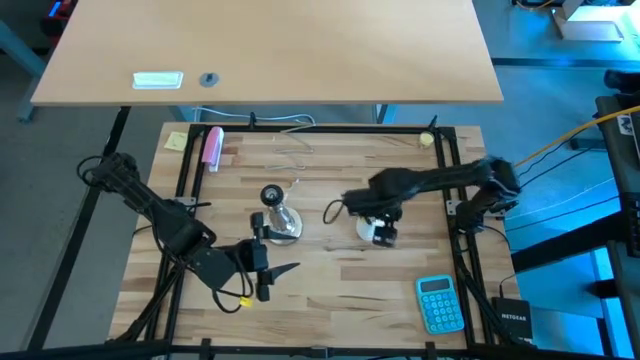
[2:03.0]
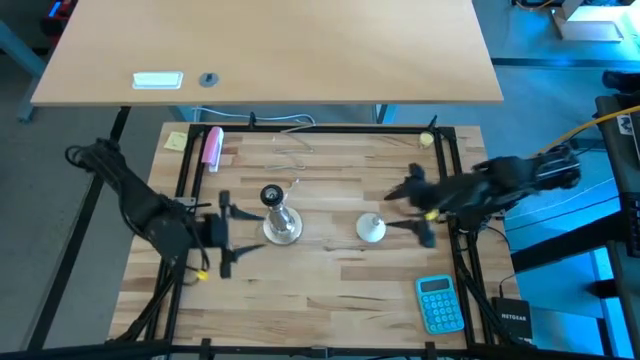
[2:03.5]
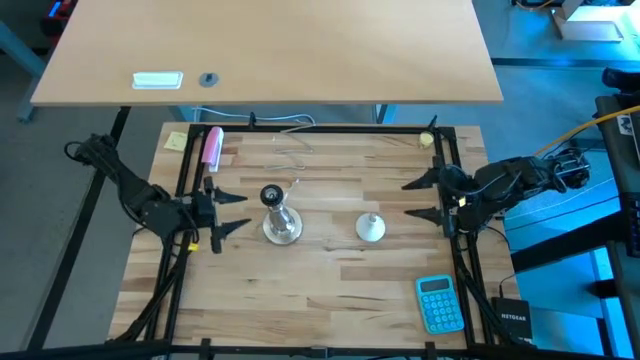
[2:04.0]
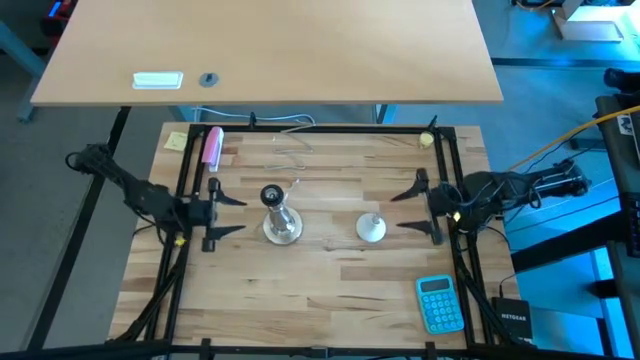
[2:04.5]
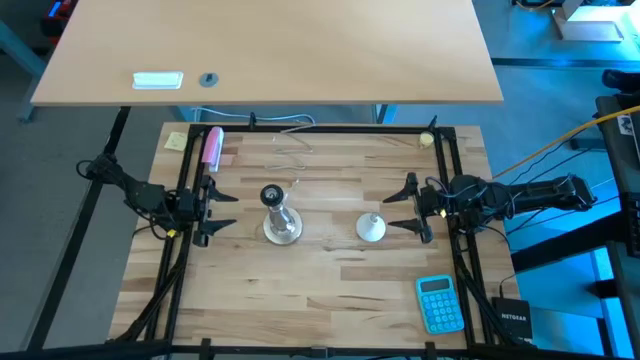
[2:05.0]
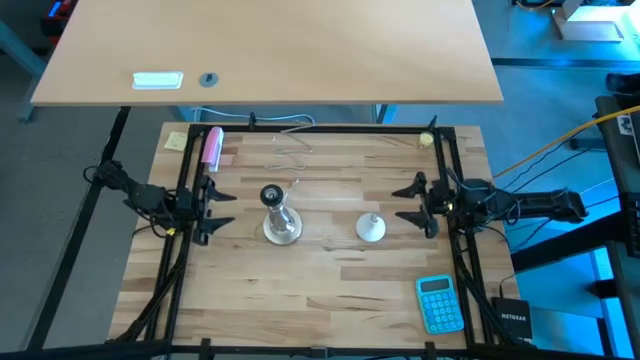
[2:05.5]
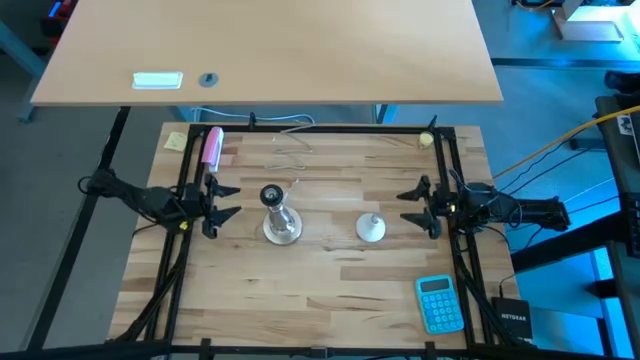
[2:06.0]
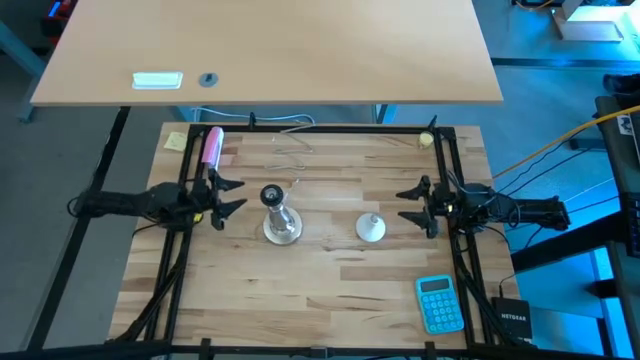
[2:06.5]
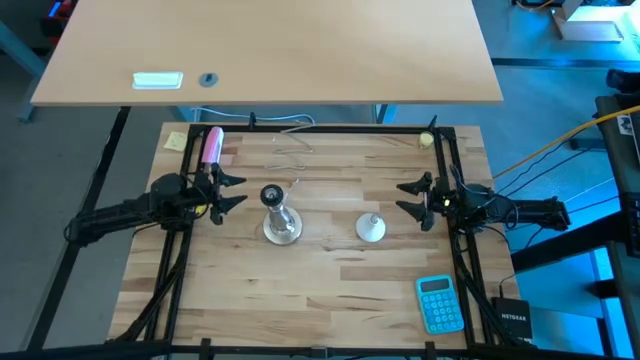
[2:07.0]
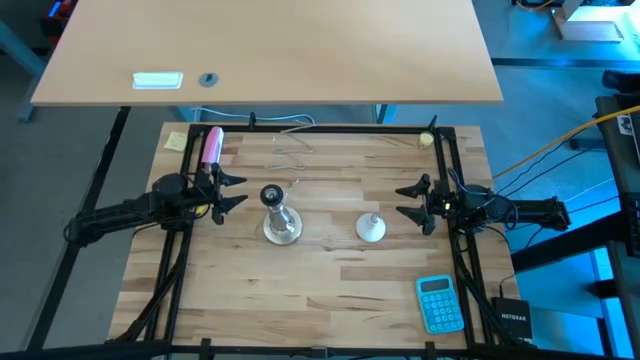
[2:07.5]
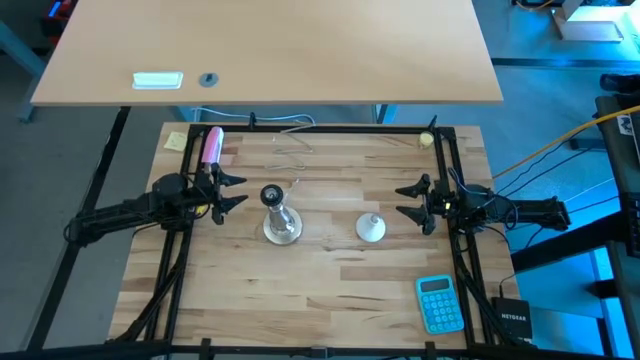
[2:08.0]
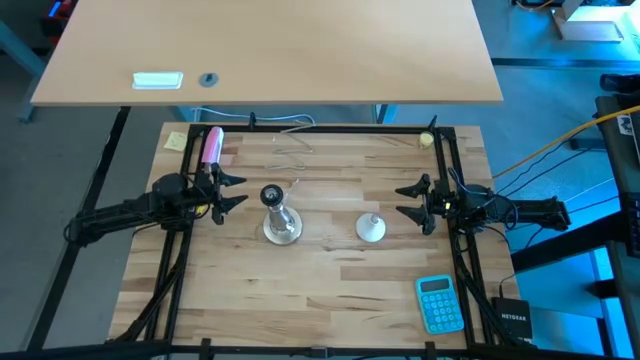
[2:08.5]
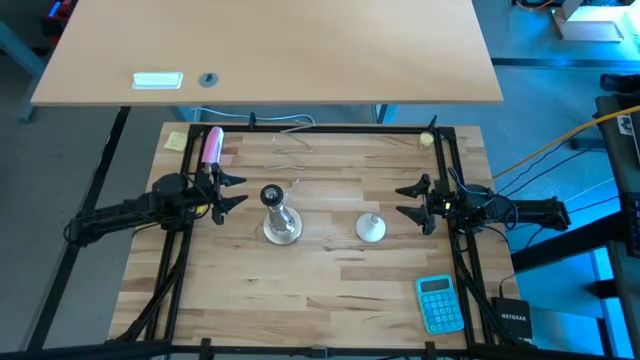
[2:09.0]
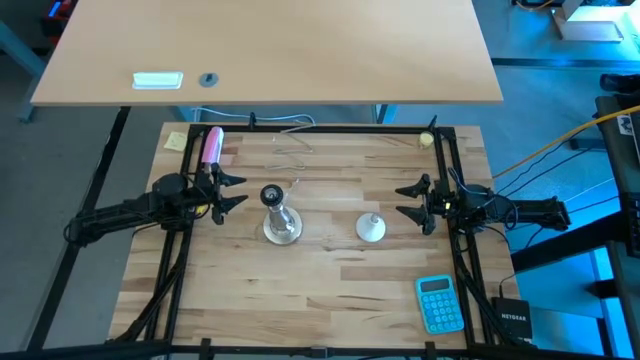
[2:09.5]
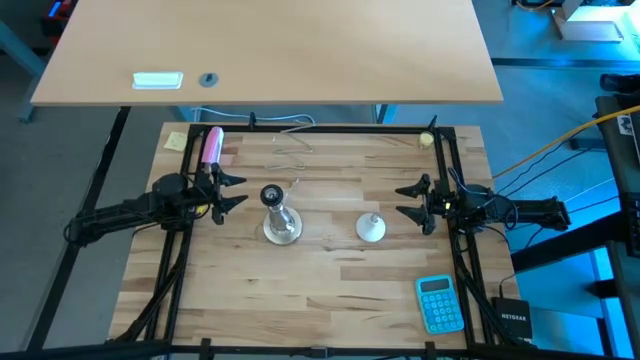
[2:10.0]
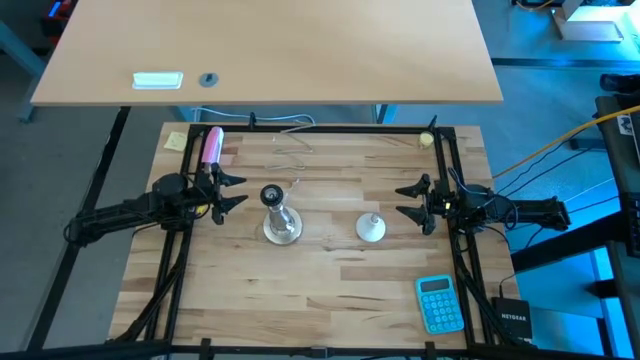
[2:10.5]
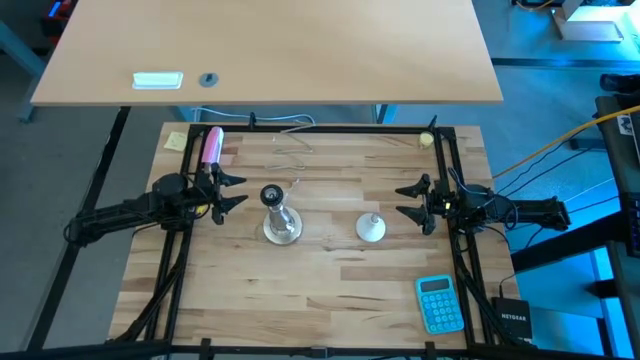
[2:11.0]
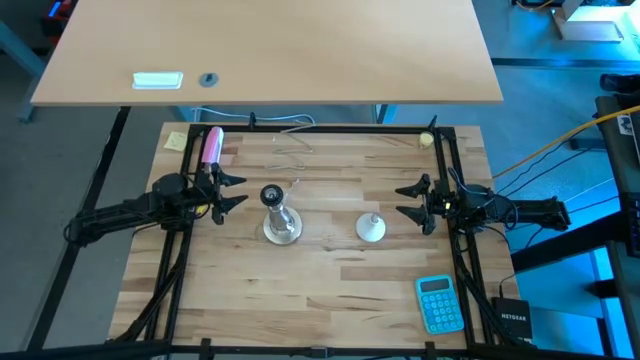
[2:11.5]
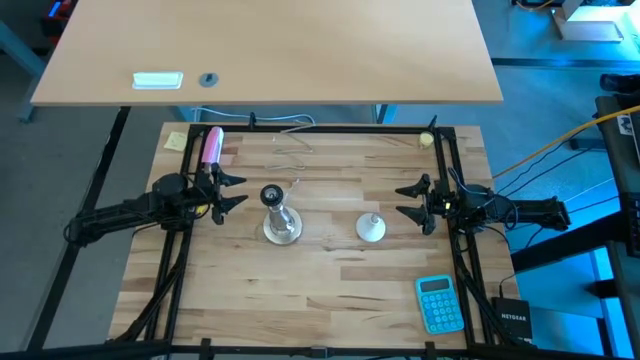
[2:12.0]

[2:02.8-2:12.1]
Task: Screw lightbulb
Return to Home Position

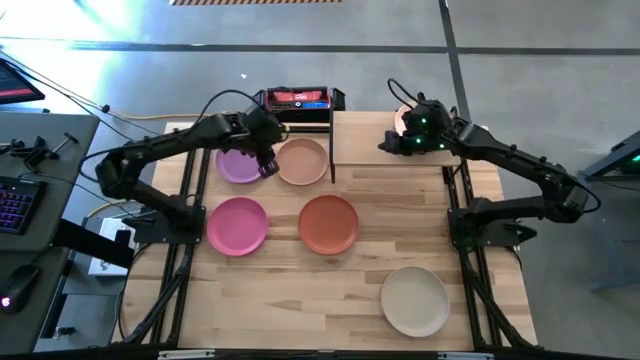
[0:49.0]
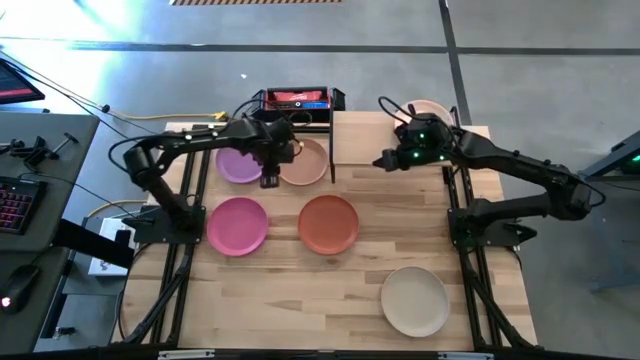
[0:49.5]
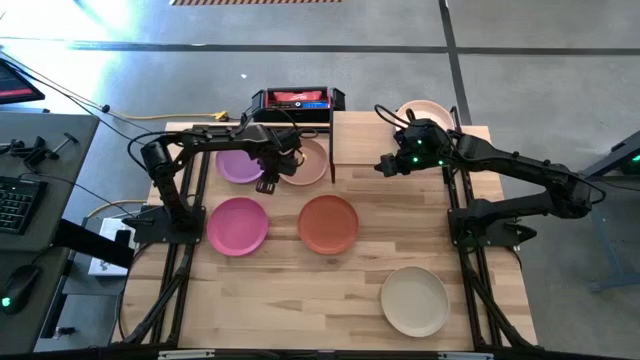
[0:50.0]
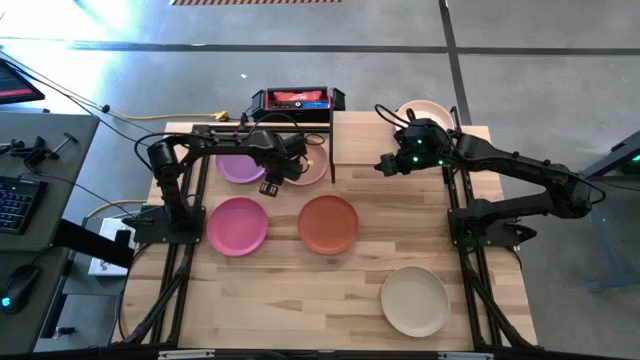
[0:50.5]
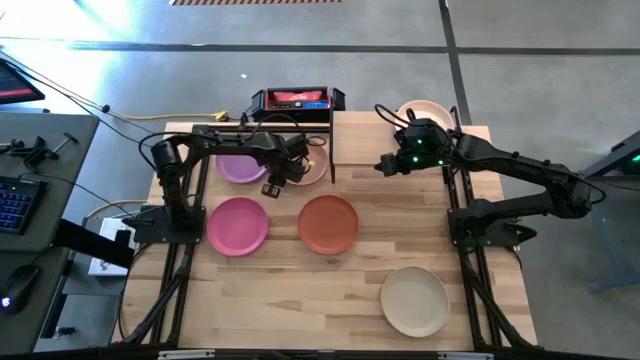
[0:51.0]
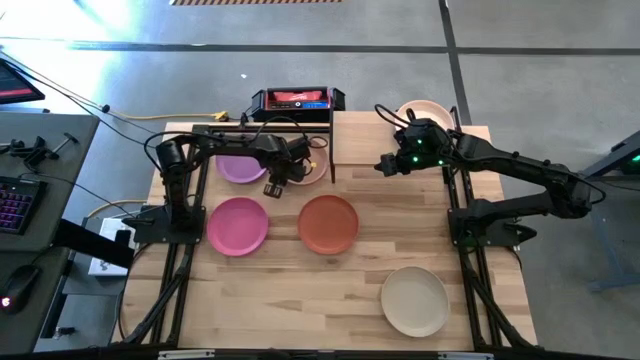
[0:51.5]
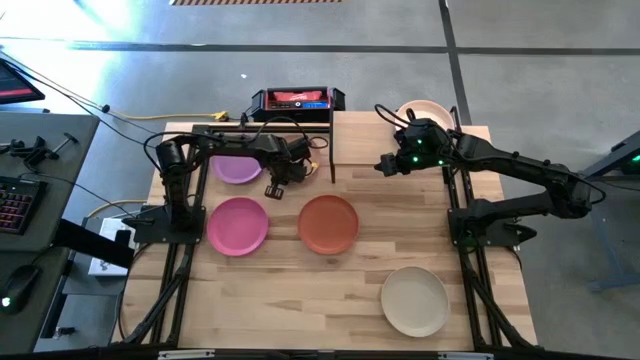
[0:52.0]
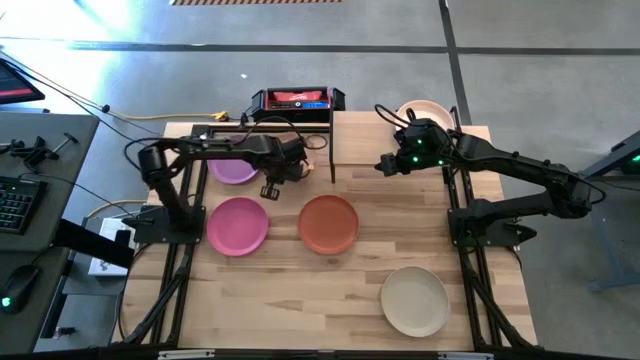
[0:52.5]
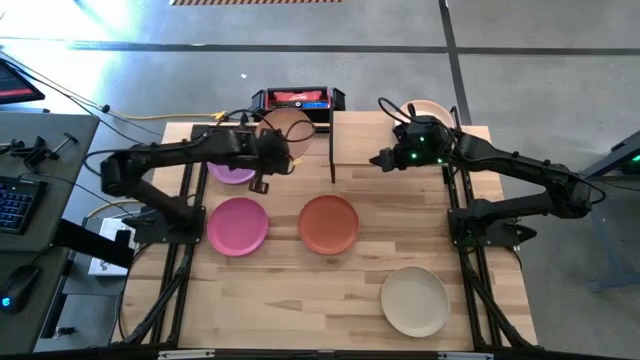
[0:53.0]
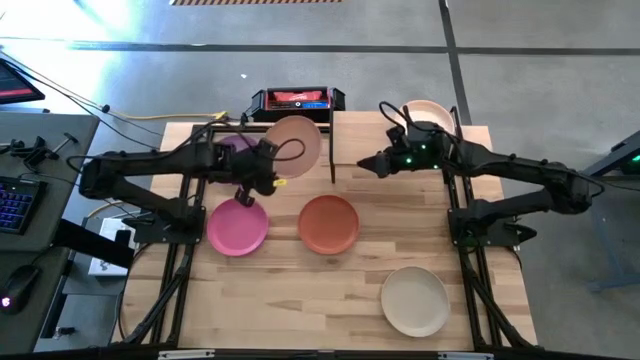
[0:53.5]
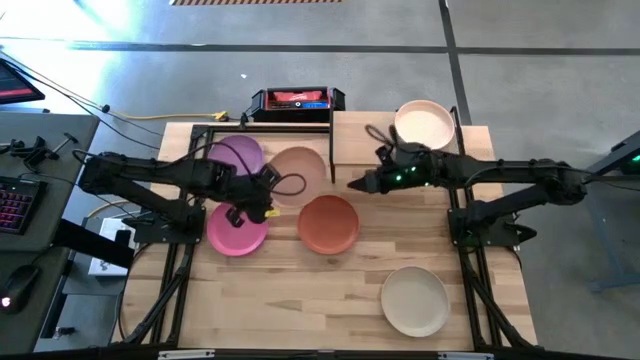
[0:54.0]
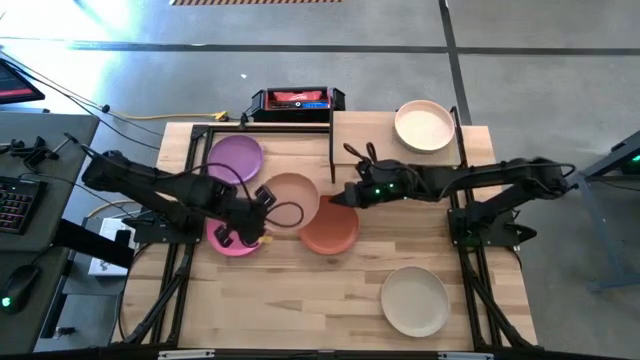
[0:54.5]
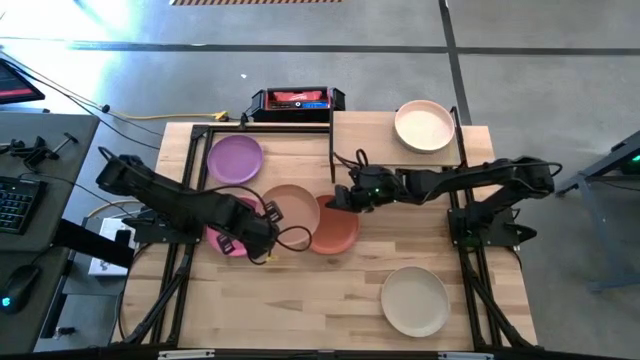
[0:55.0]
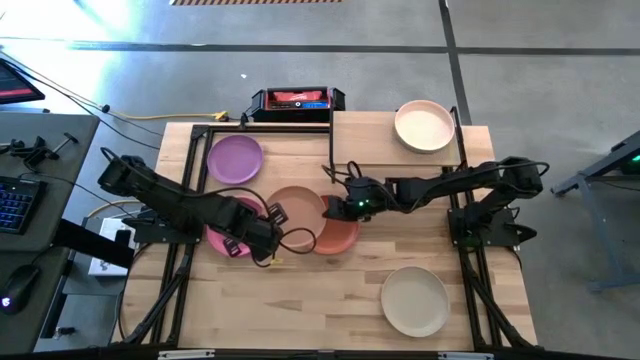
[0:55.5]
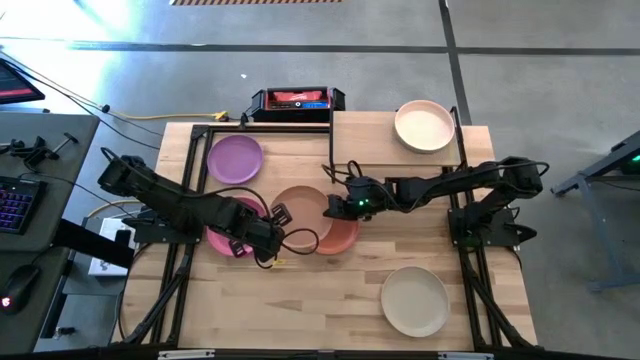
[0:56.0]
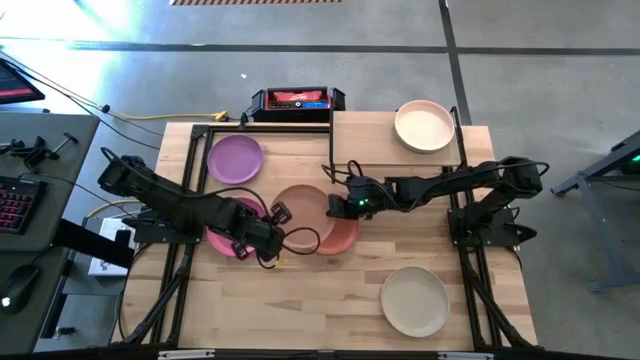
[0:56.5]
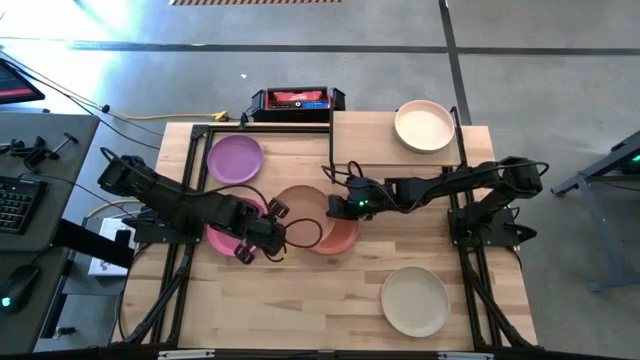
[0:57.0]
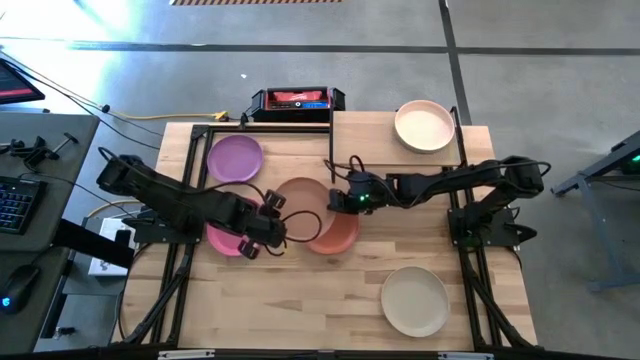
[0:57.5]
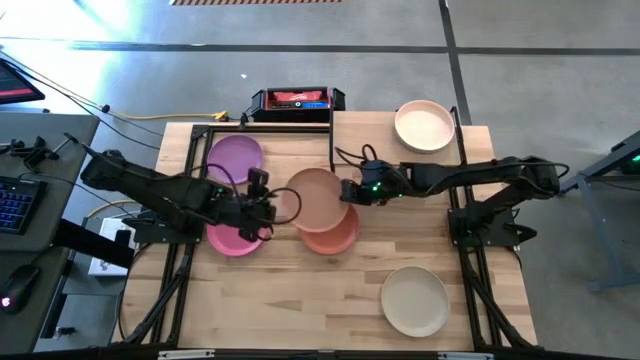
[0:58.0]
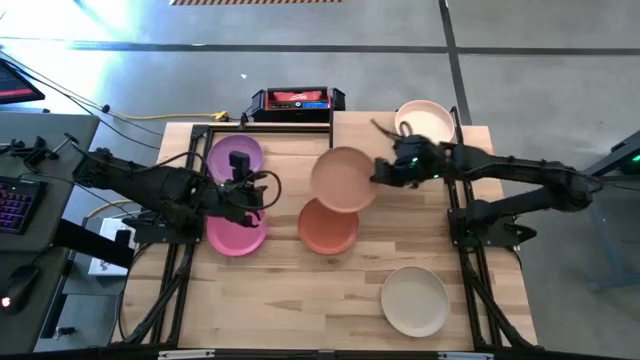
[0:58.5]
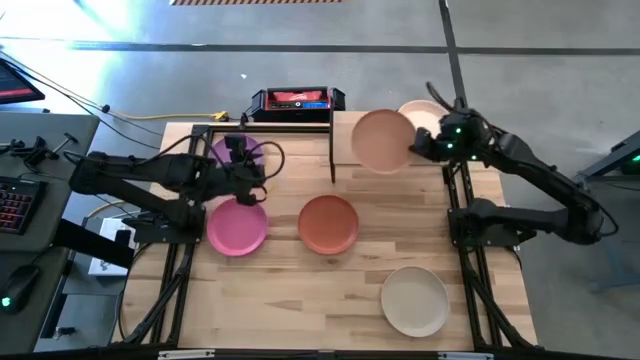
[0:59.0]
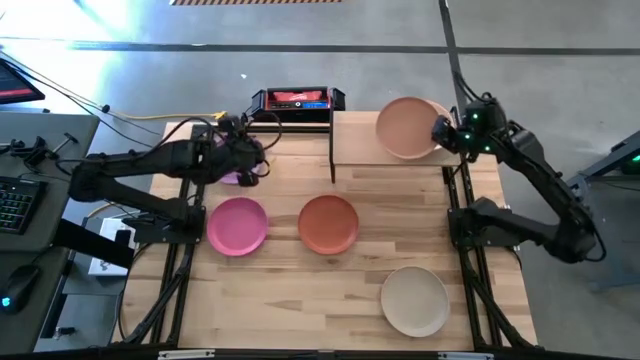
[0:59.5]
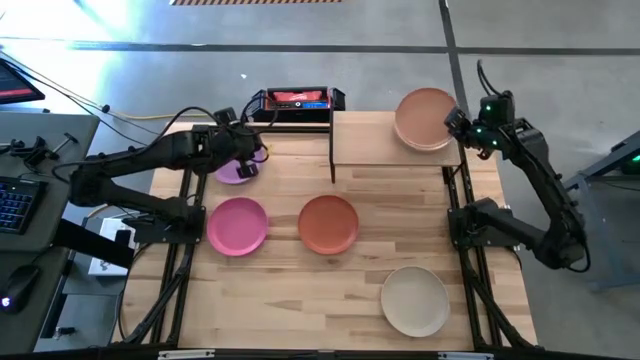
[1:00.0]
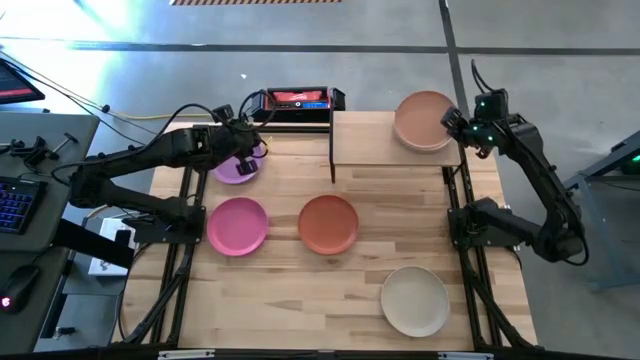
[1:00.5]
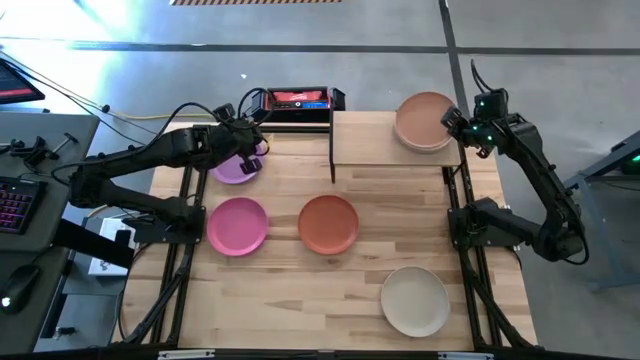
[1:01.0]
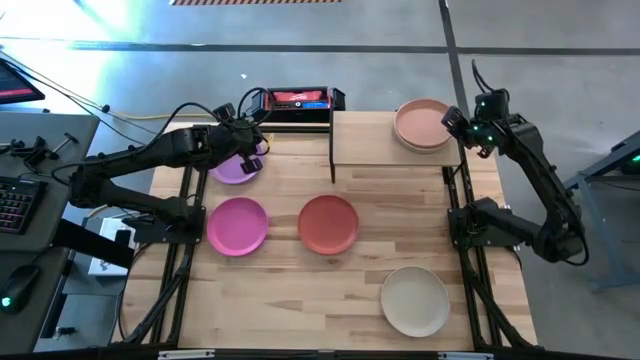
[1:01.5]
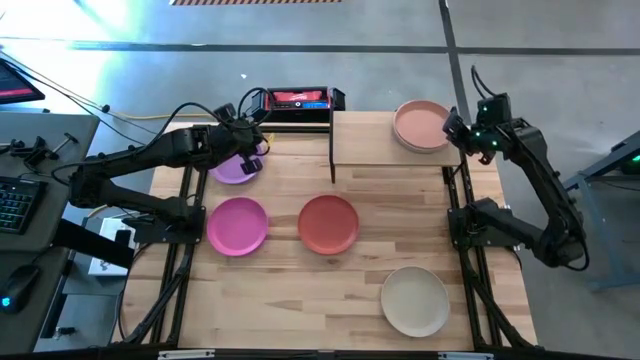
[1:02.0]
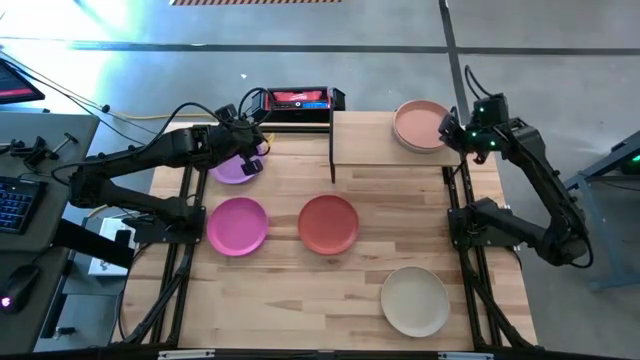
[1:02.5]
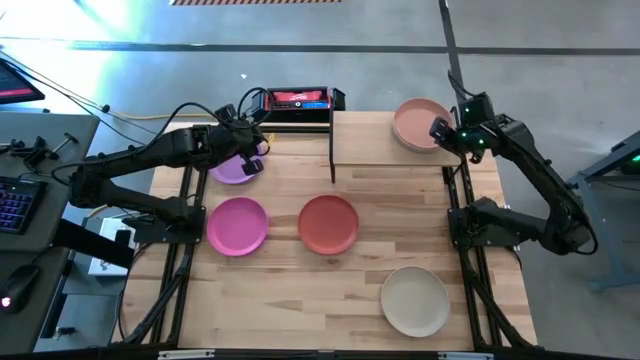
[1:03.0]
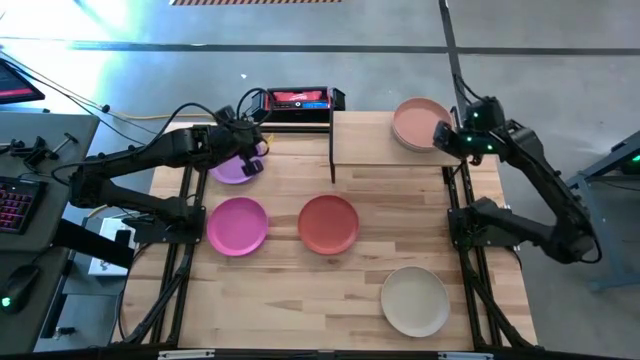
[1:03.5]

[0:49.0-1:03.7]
Task: Place and stack plates onto a shelf
Stack the brown plate on top of the light orange plate on the shelf
